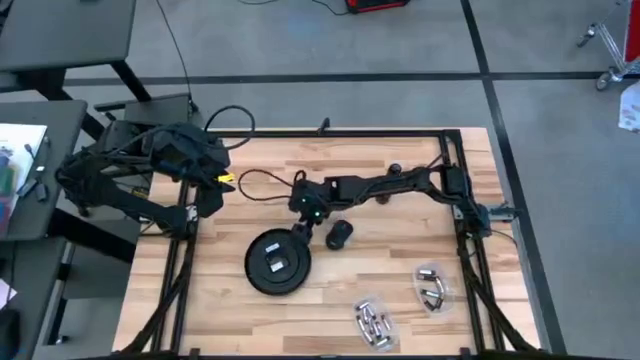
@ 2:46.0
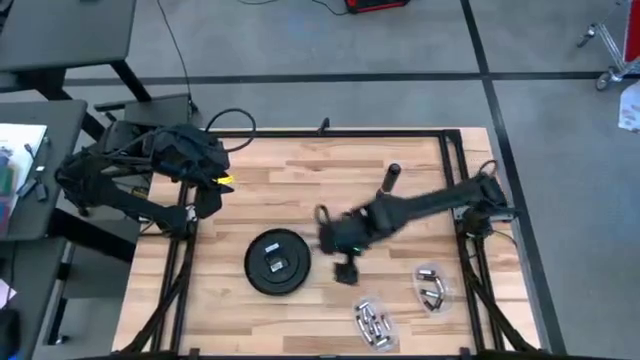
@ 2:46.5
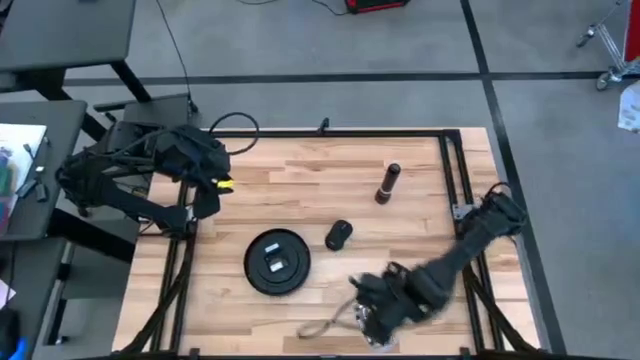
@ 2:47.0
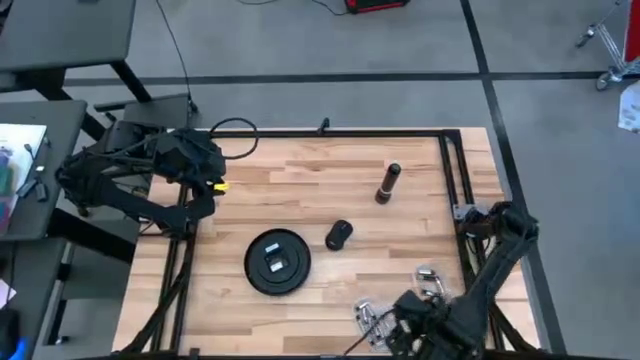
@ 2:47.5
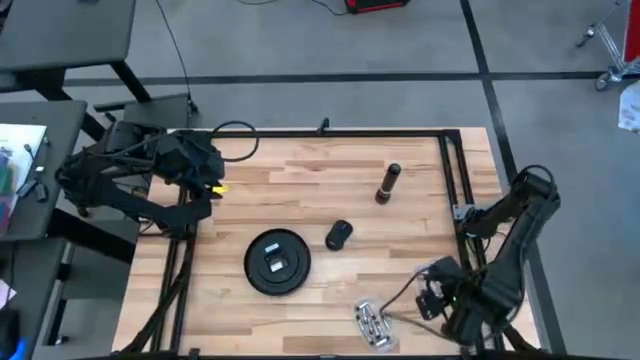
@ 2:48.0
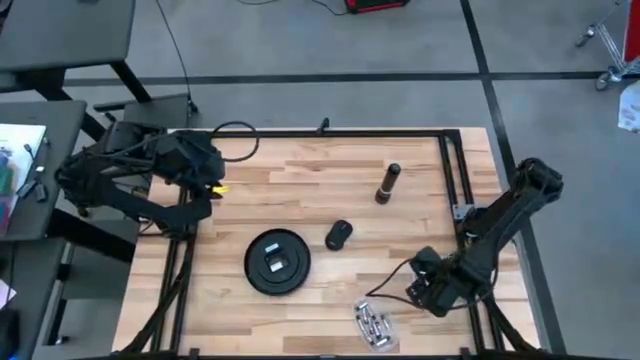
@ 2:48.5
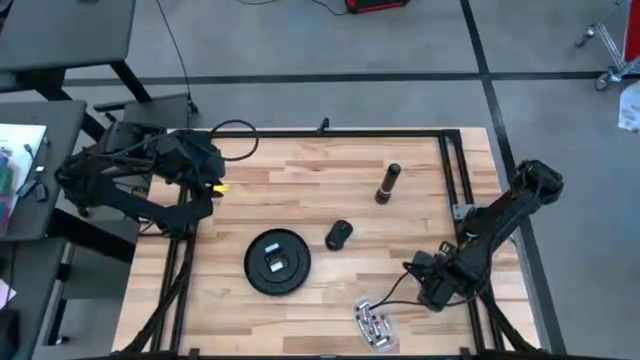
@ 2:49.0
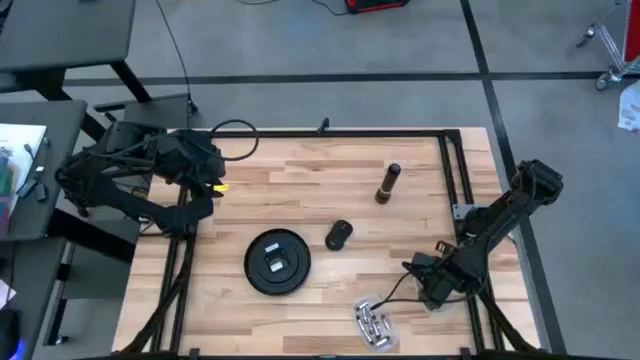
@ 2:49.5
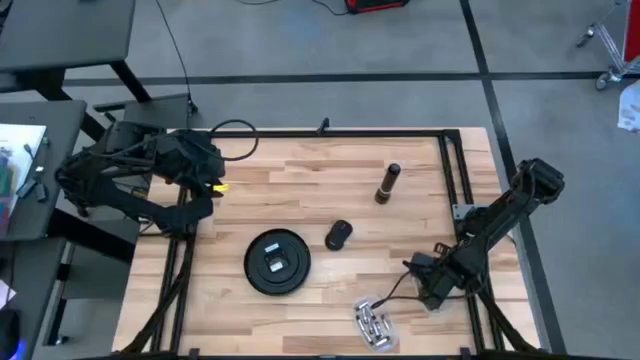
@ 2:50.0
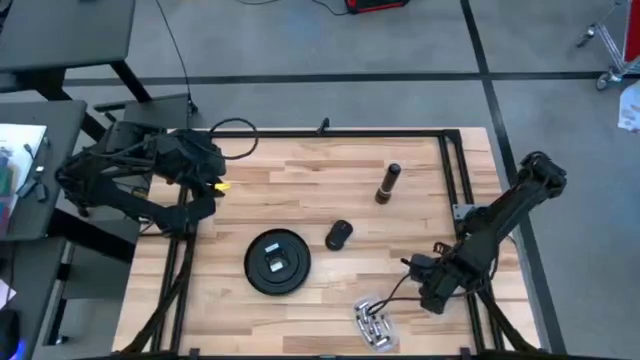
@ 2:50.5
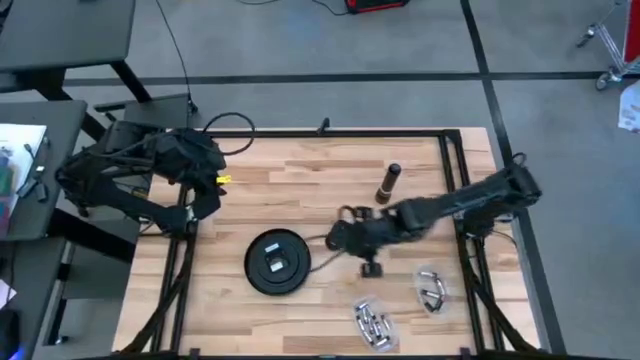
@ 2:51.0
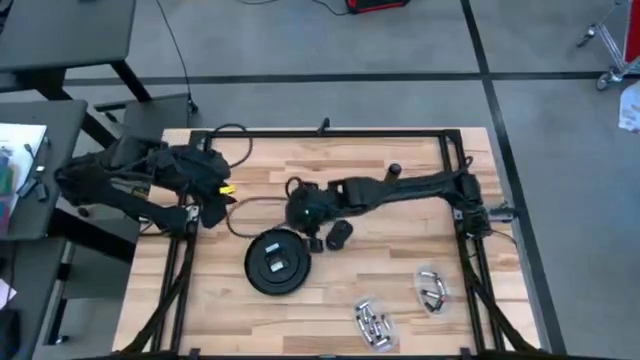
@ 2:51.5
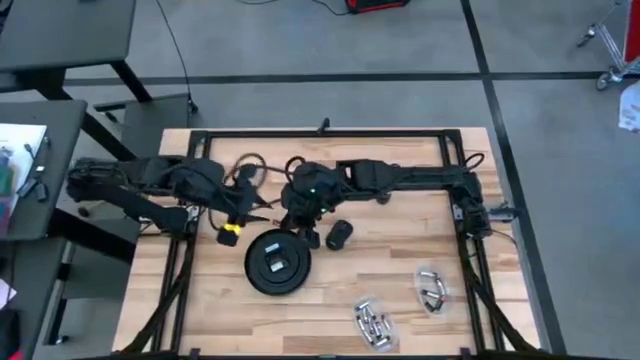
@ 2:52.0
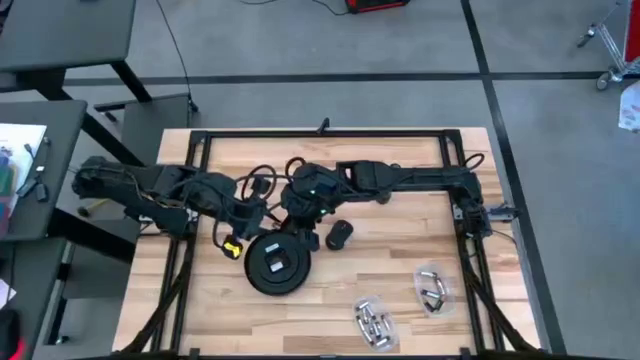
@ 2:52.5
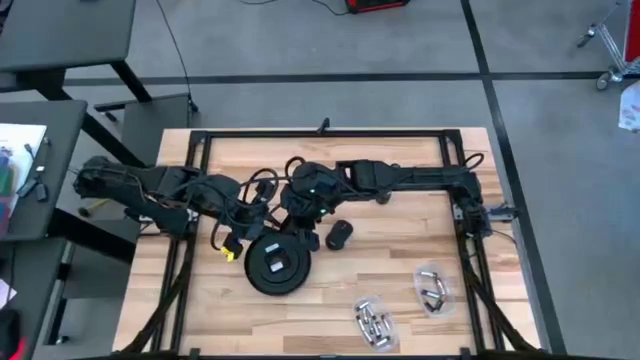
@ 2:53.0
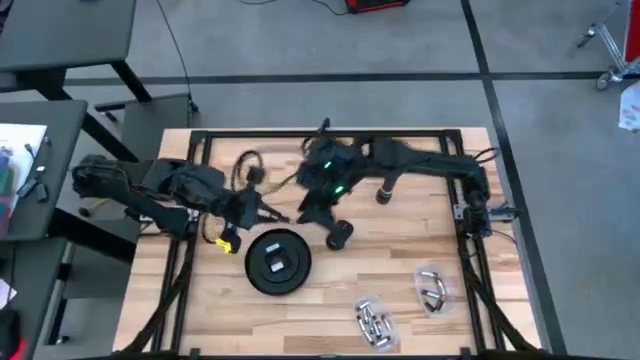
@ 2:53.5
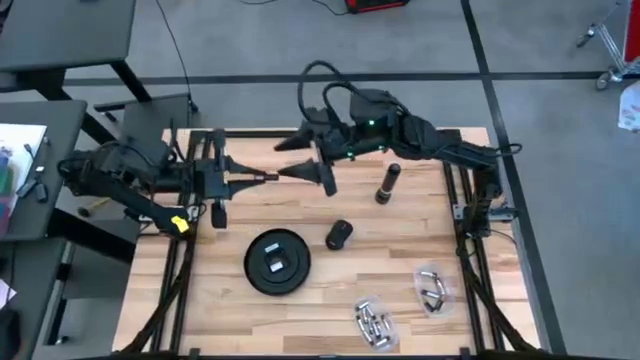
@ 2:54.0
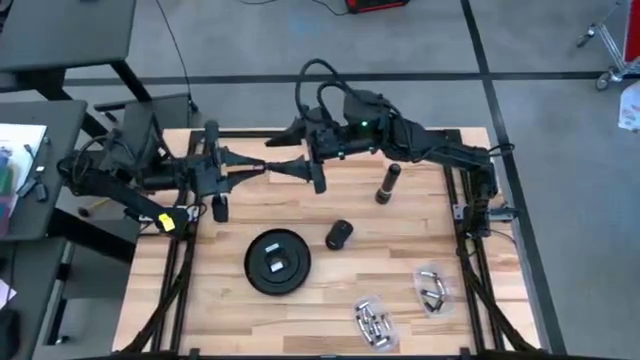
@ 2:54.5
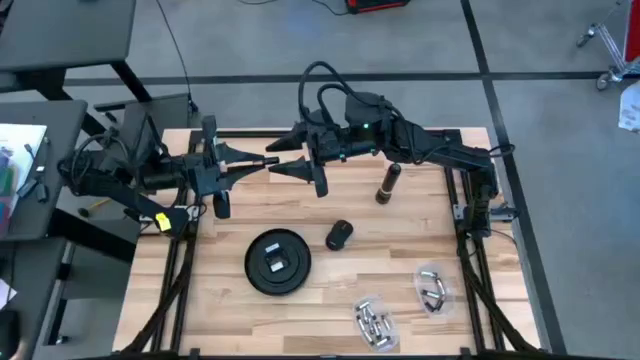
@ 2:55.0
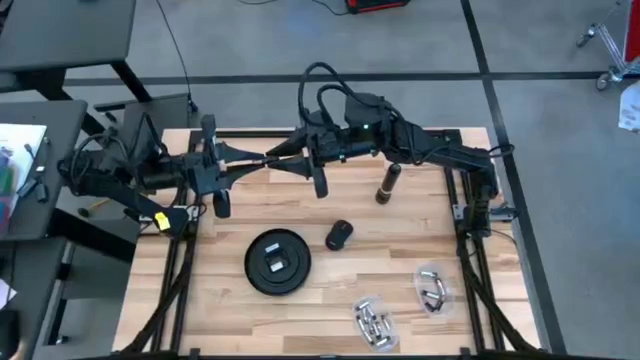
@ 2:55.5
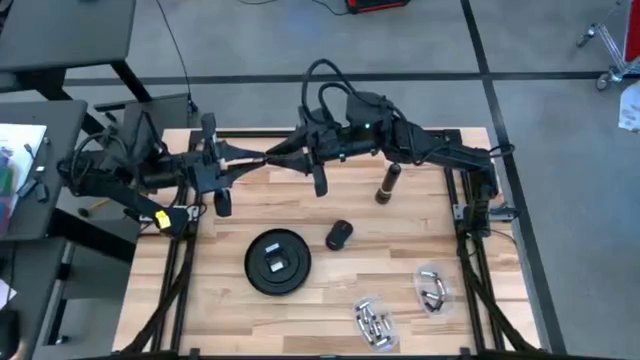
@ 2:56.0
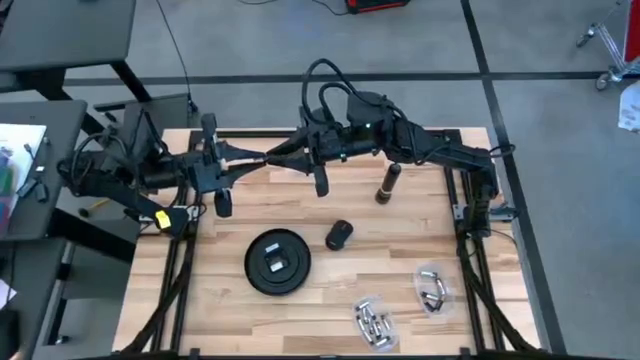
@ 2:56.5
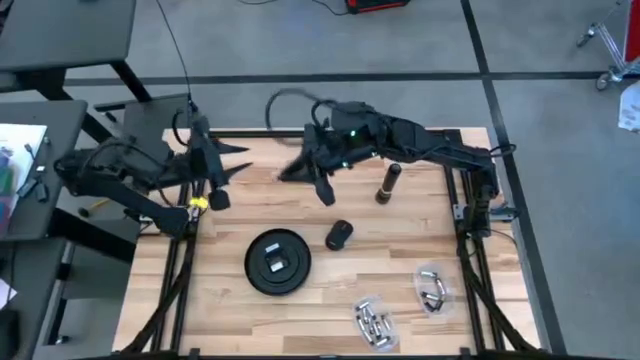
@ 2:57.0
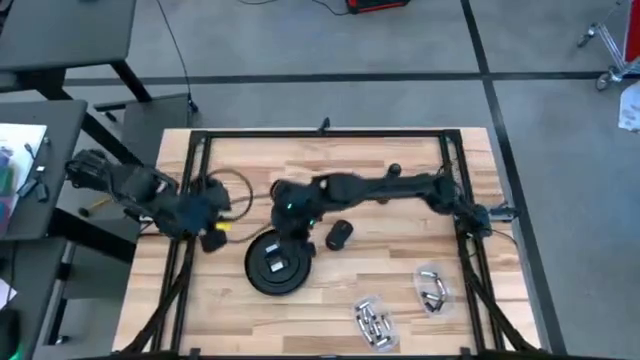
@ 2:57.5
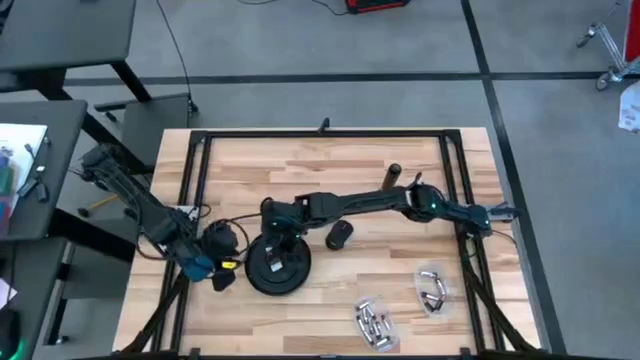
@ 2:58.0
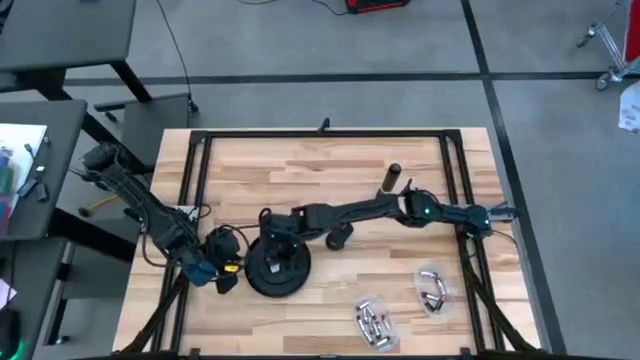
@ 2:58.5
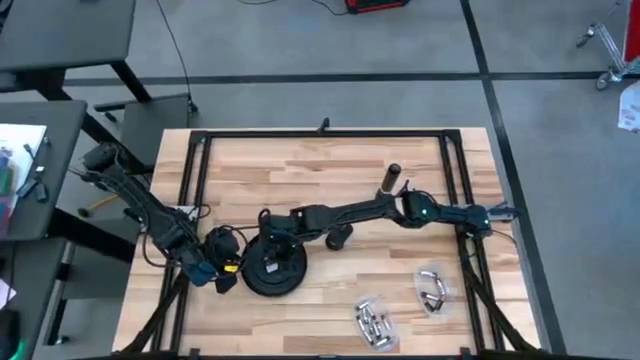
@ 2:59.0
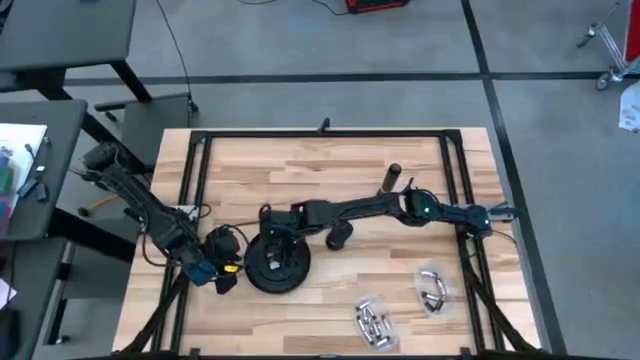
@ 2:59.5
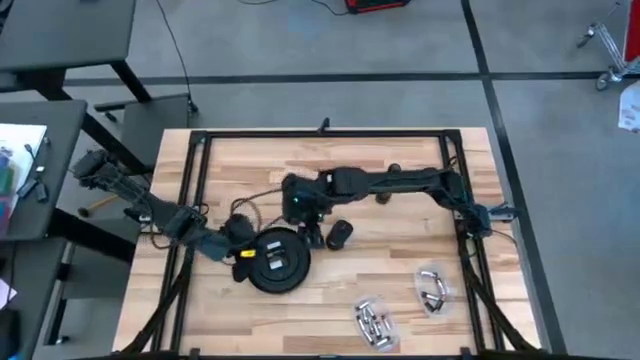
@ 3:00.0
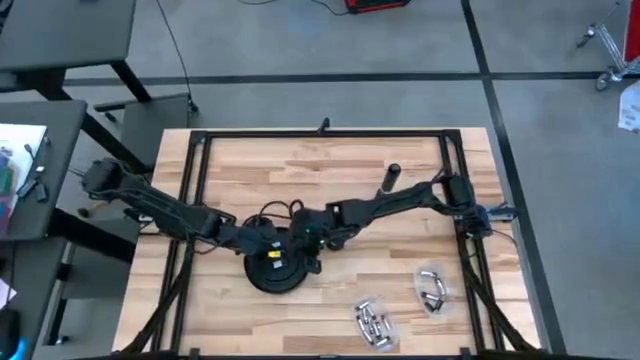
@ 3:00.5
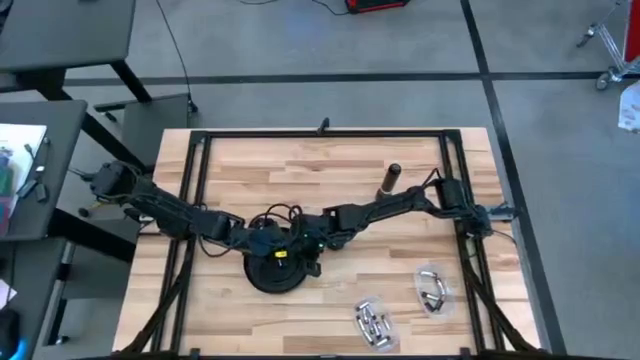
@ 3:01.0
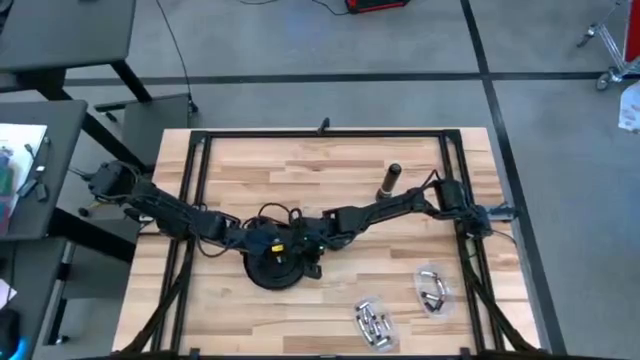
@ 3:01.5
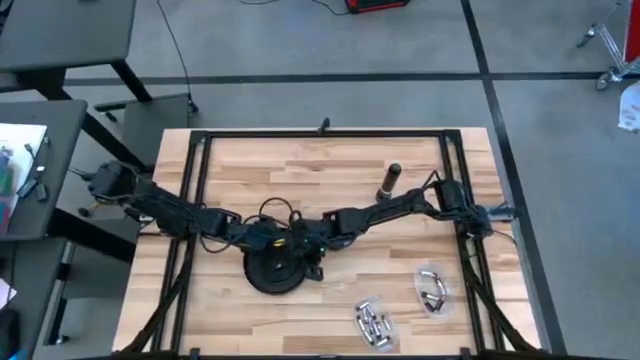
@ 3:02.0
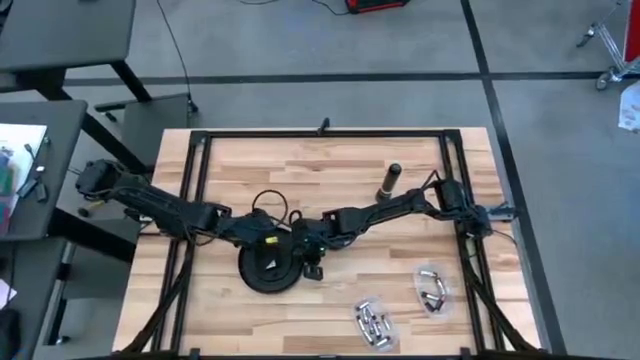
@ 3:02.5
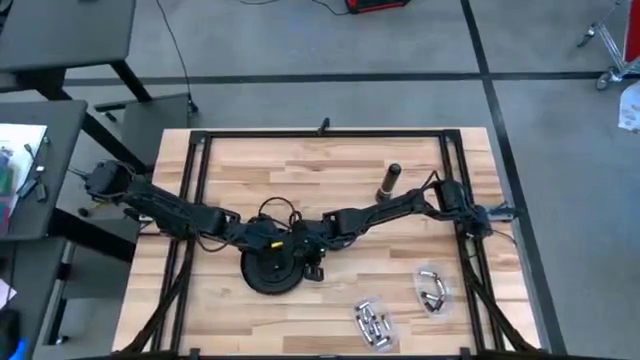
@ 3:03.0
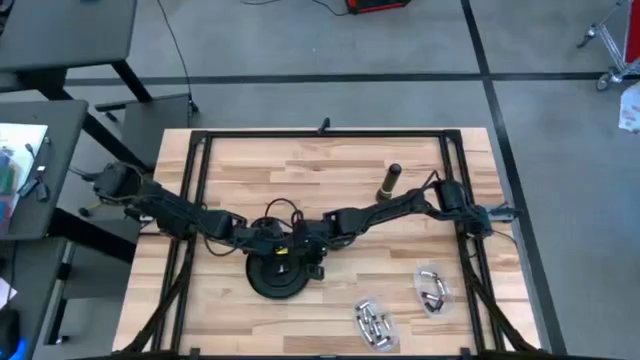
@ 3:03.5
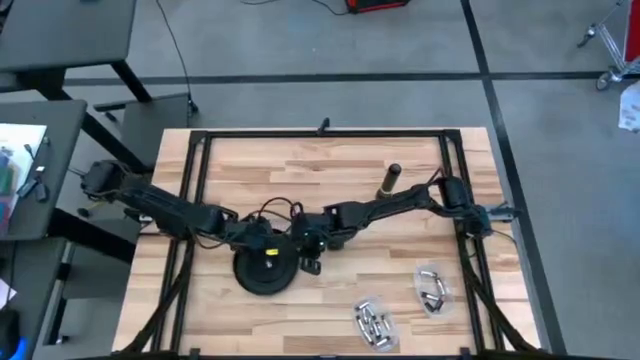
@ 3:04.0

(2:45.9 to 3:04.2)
Task: Insert battery
Insert the brown battery into the white wall clock battery compartment

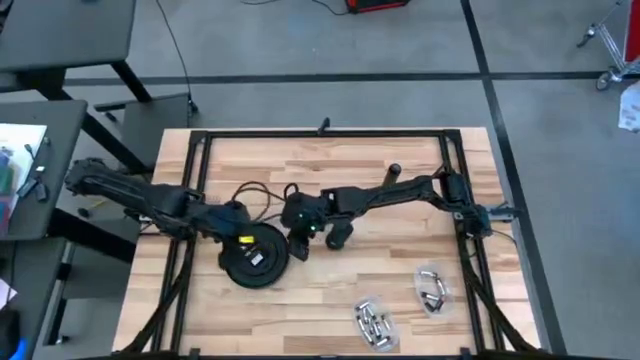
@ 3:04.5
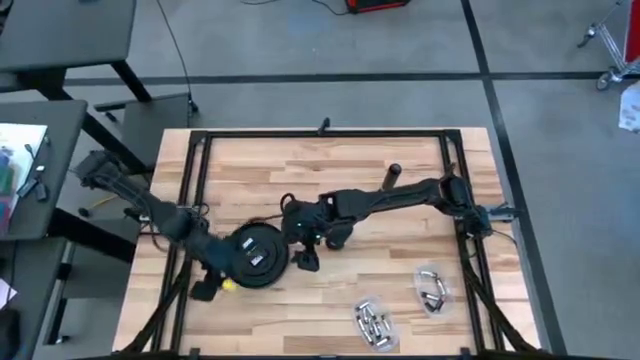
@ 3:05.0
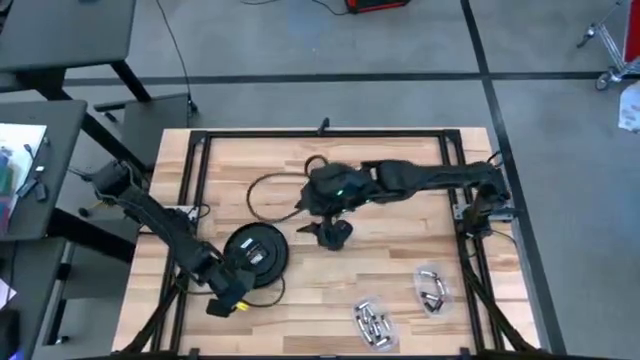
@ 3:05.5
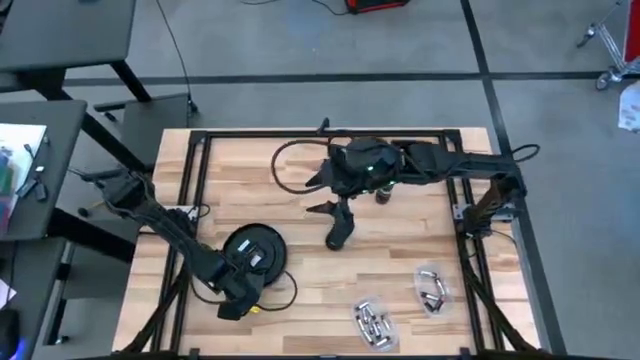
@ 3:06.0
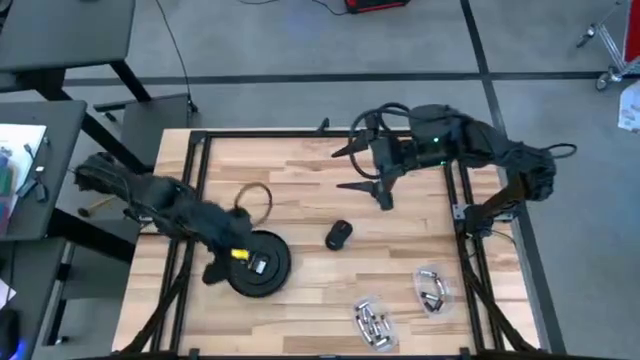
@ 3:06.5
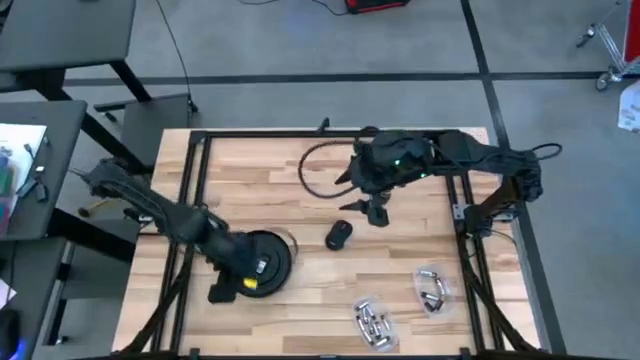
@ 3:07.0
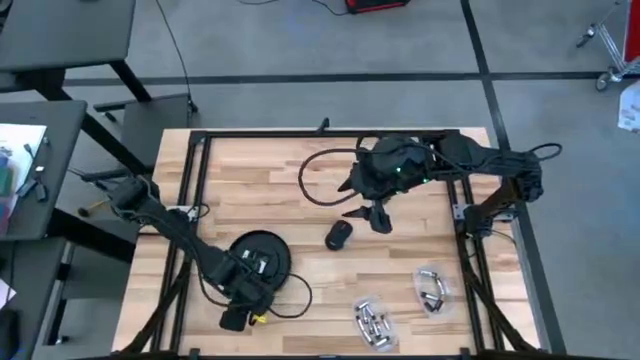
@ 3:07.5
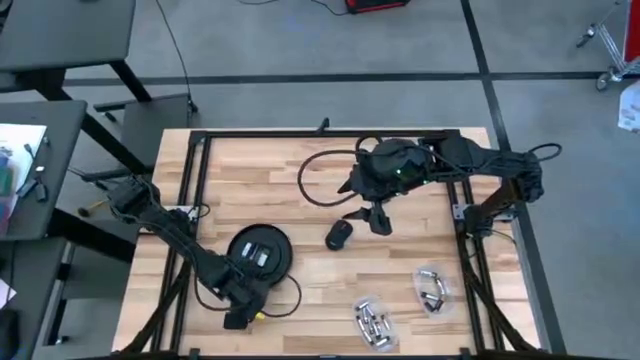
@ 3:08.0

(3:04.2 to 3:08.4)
Adjust the white wall clock
